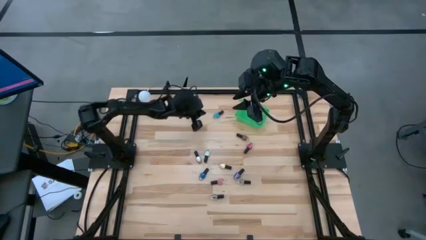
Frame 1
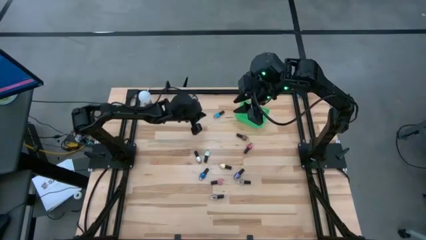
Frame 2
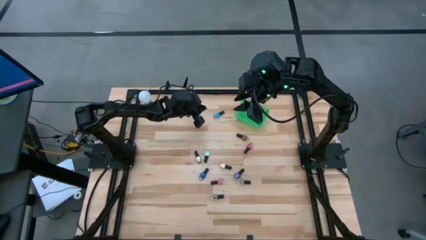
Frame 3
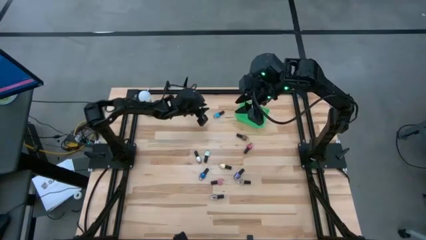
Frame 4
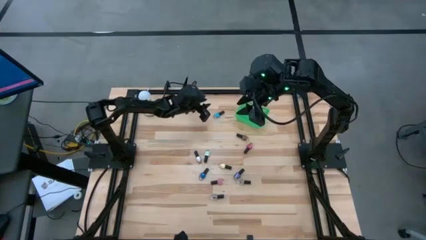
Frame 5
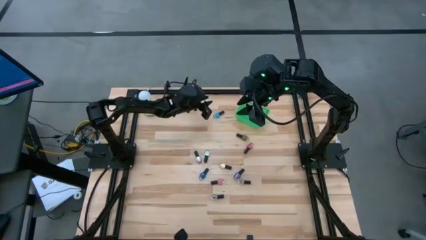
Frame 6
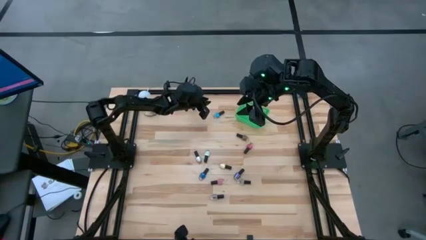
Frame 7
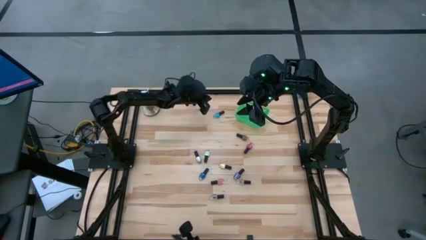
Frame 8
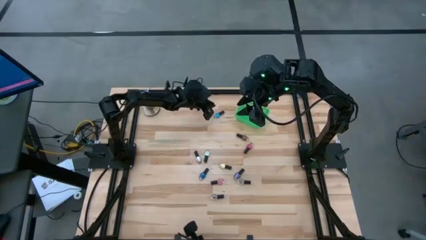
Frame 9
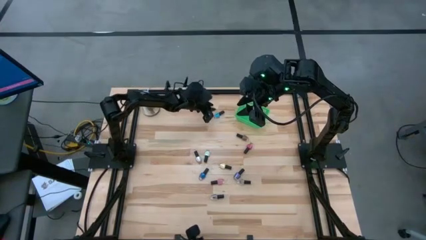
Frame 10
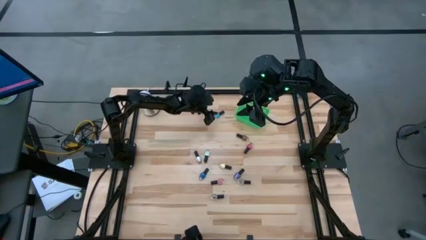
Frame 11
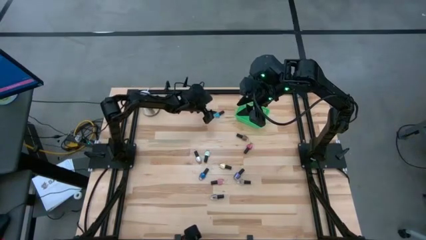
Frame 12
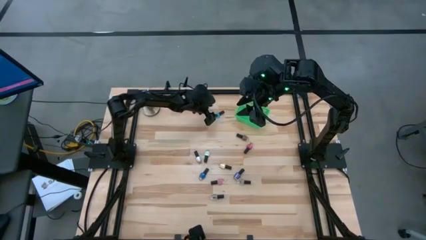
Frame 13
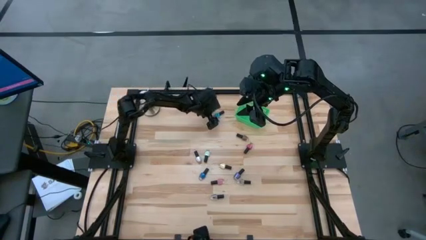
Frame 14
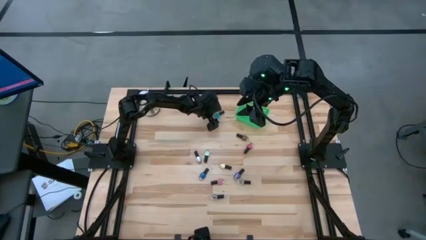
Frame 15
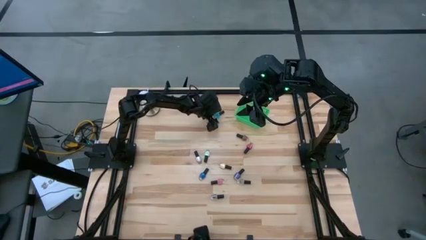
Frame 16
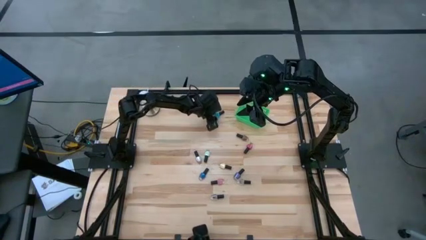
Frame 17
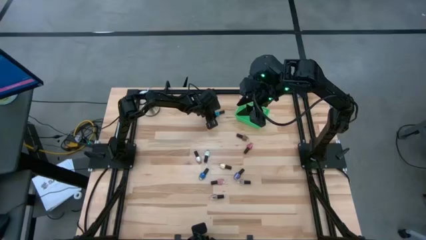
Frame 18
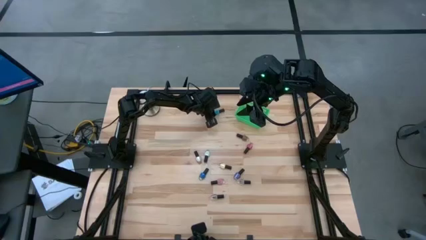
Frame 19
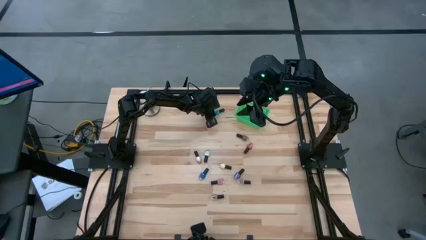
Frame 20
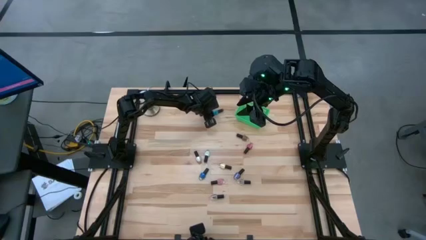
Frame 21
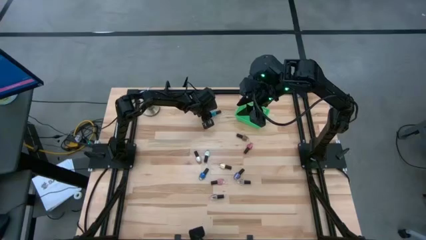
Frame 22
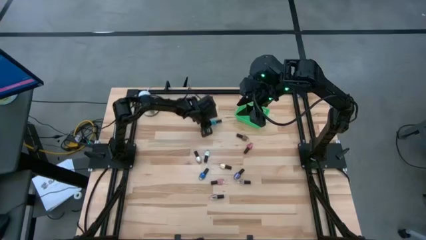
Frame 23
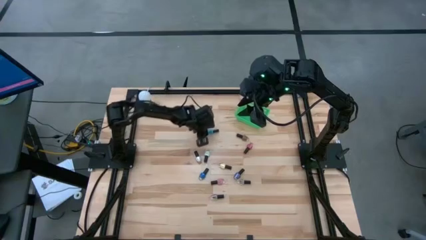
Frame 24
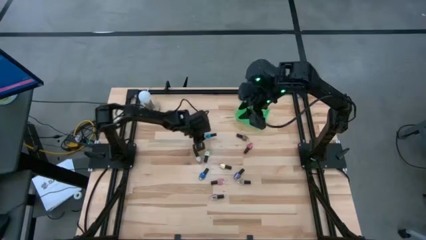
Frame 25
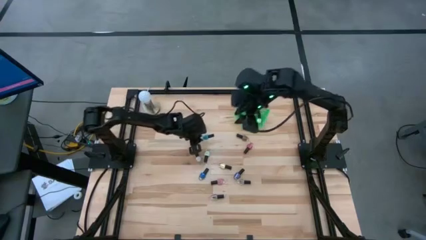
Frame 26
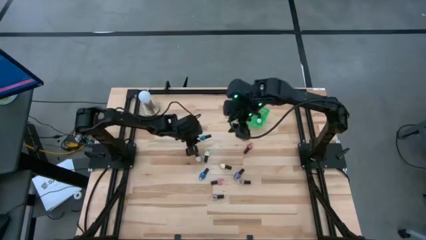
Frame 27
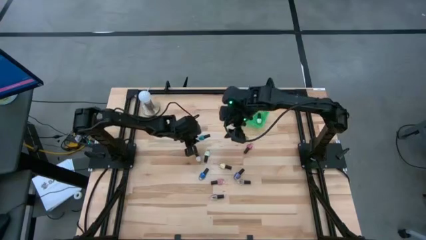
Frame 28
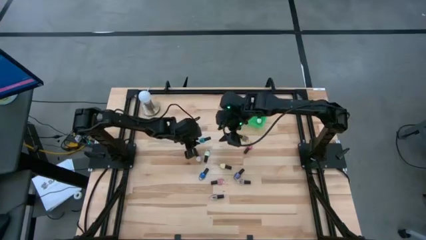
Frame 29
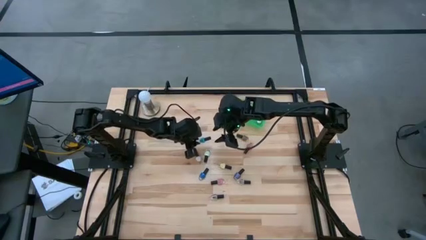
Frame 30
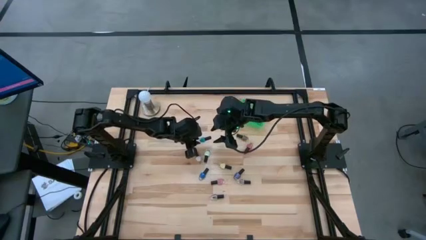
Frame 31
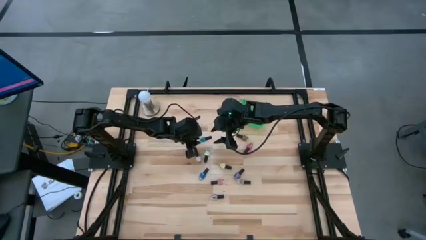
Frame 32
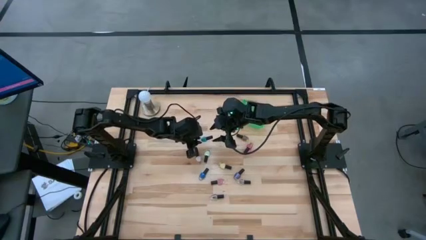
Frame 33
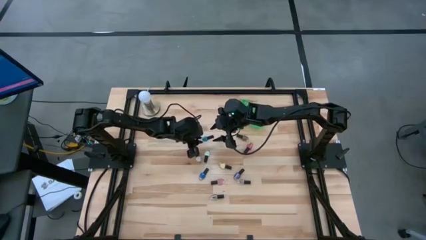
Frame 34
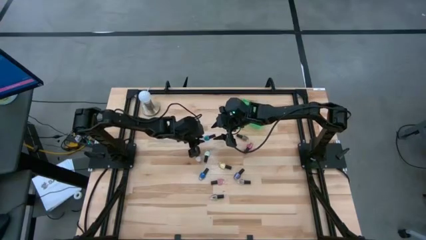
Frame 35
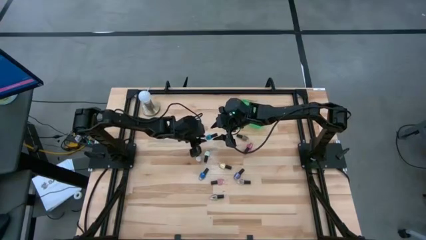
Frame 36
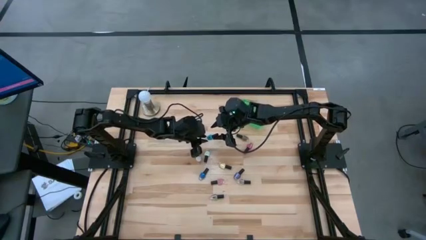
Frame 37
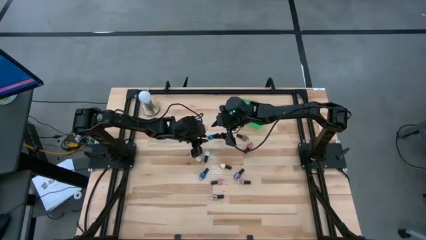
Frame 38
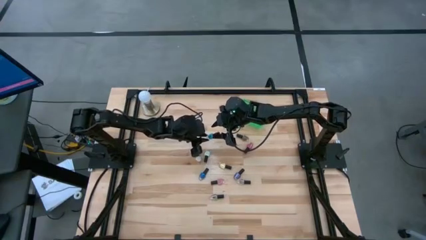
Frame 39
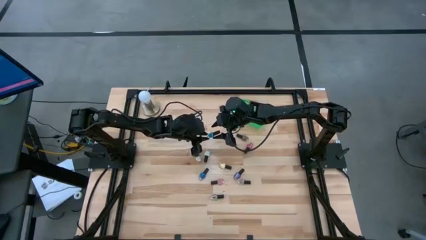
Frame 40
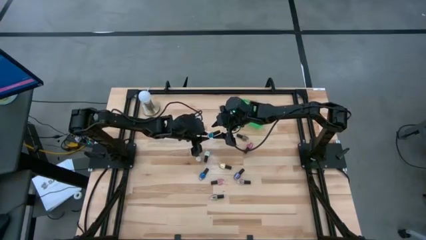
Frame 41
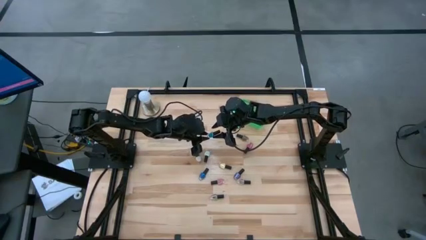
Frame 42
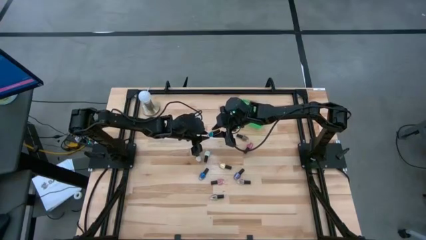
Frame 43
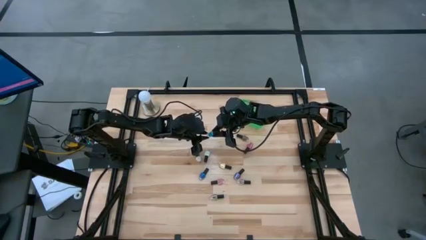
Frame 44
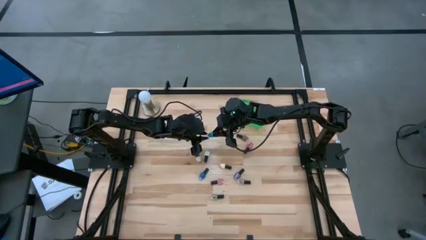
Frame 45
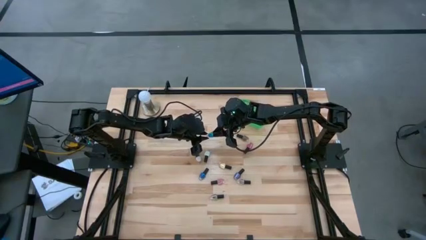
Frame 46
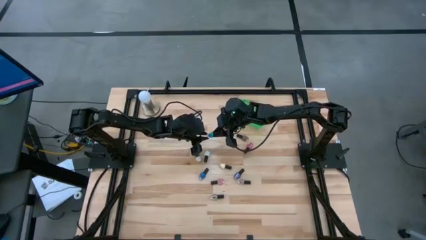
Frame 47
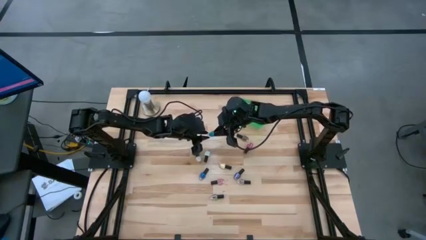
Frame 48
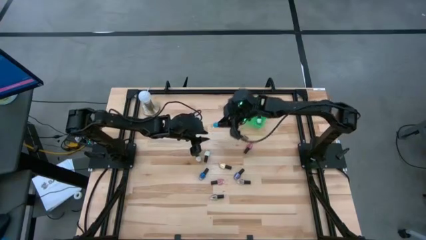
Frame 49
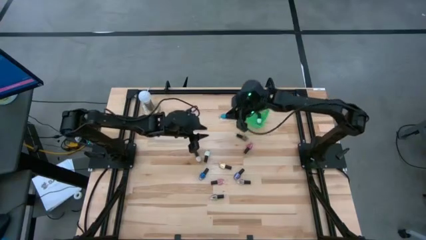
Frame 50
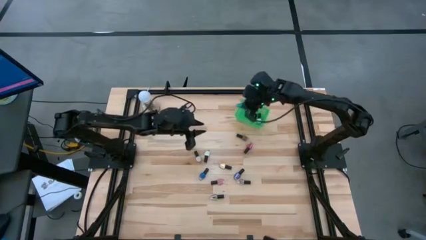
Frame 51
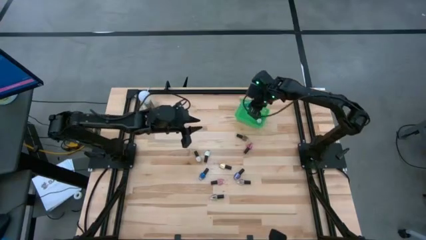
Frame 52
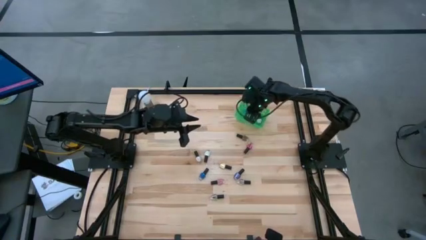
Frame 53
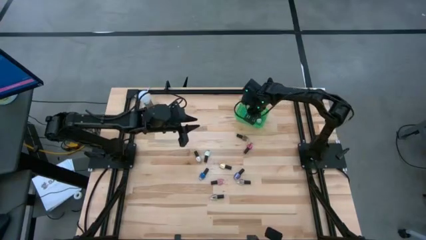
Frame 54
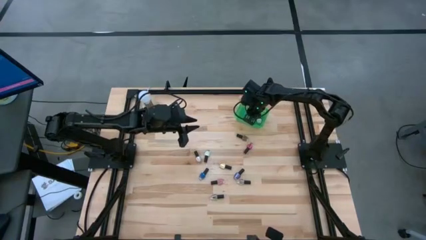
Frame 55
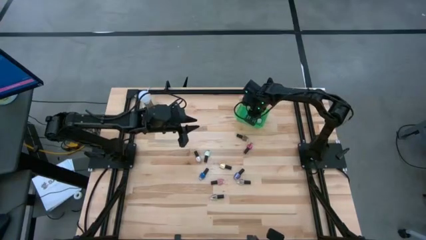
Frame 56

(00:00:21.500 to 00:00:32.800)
Task: Pick & Place Nail Polish
Put the light blue nail polish into the green bin

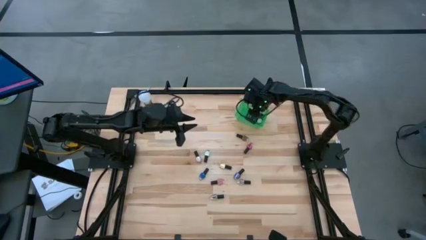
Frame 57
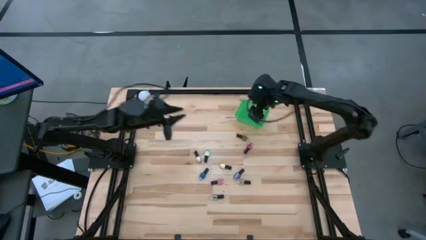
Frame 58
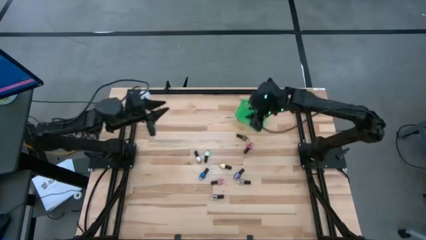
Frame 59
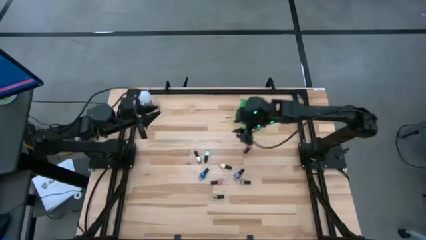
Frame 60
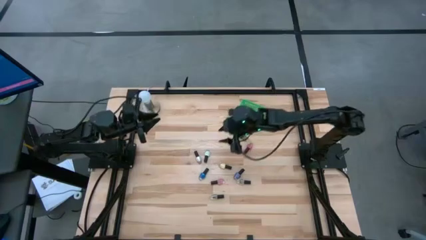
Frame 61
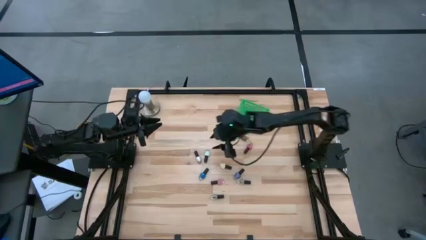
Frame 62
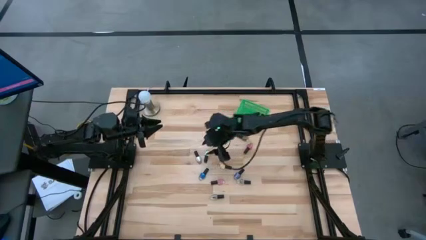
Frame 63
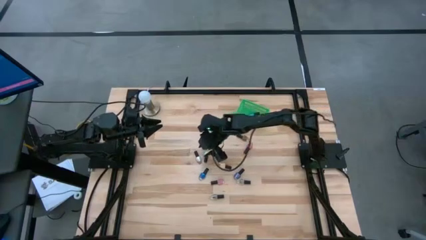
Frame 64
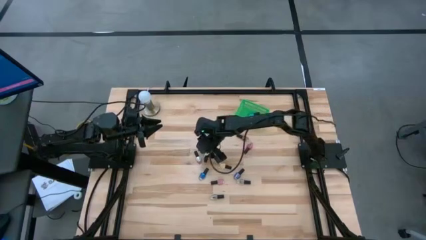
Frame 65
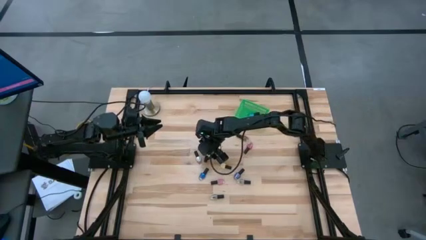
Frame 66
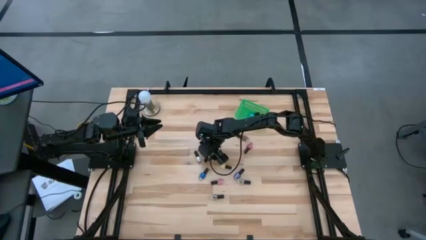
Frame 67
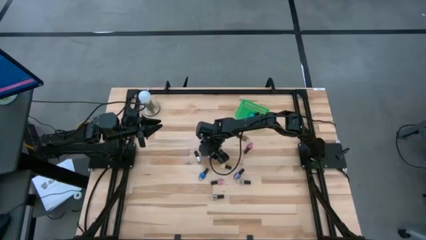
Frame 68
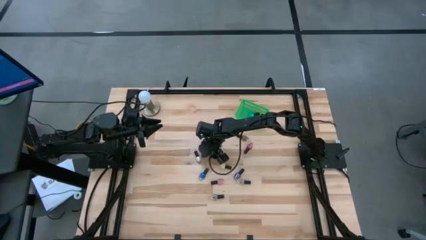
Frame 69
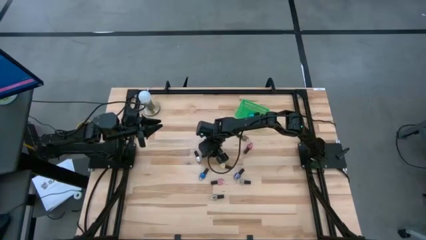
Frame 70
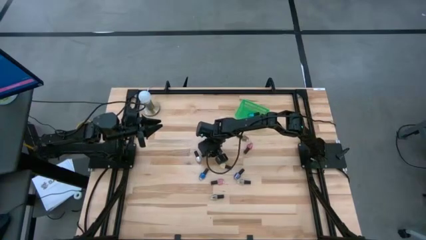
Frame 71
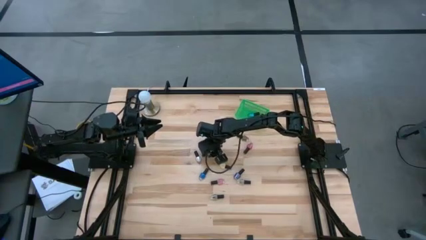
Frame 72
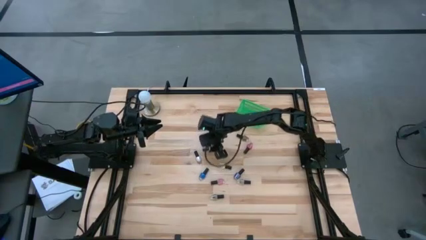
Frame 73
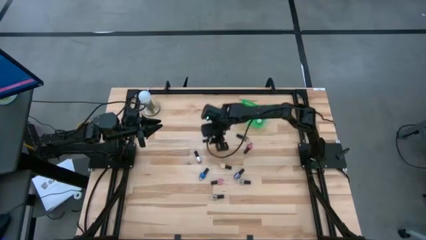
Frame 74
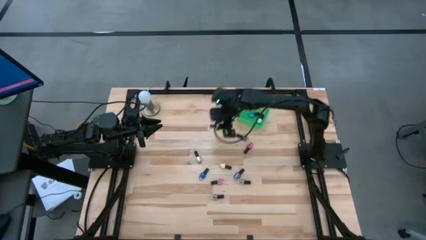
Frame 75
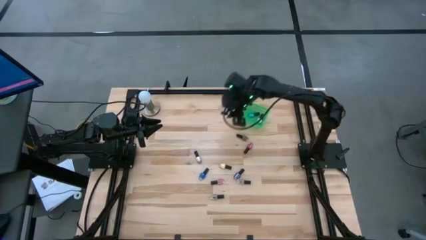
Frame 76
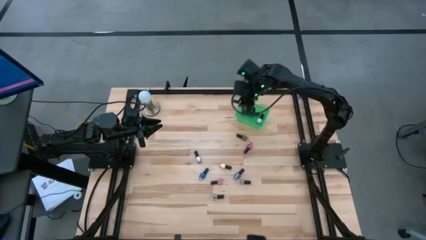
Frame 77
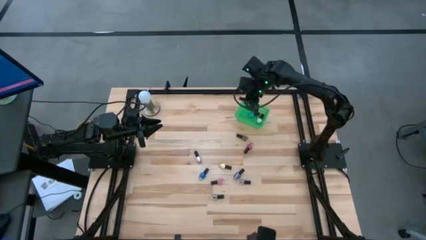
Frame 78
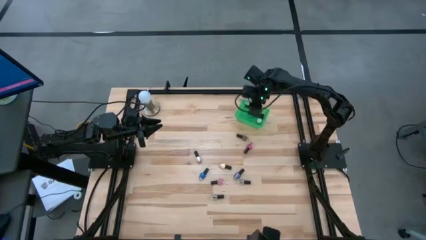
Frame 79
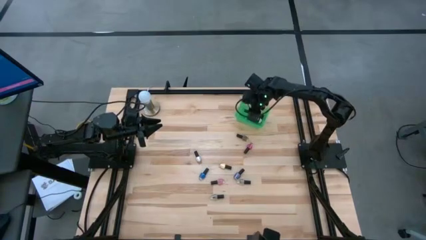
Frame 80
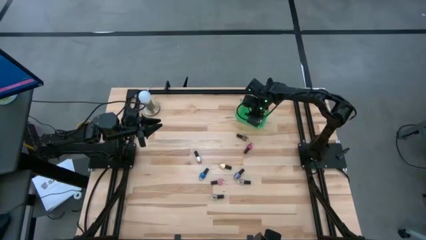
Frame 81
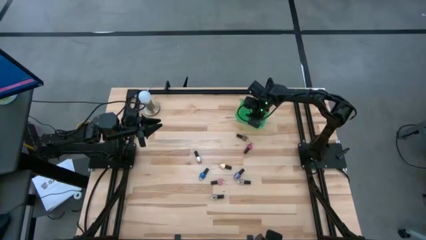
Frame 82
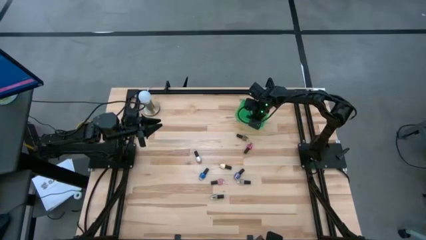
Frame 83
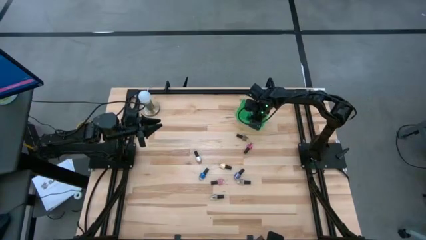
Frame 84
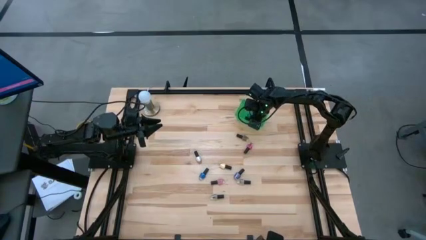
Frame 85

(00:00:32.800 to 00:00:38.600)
Put the right white nail polish into the green bin
